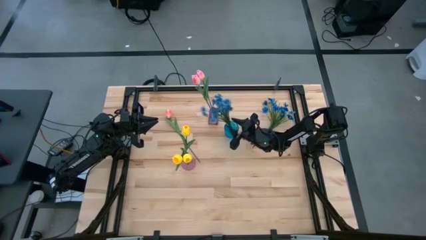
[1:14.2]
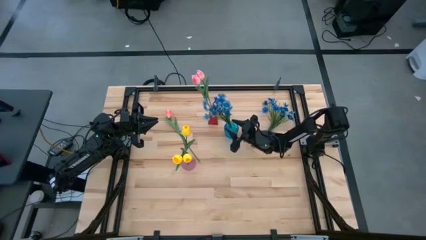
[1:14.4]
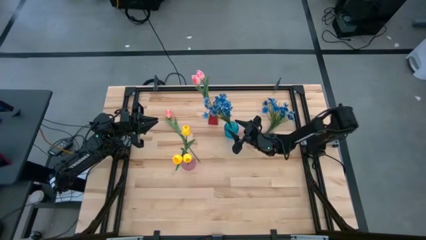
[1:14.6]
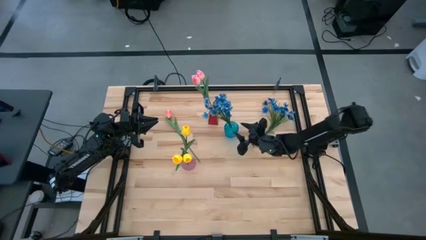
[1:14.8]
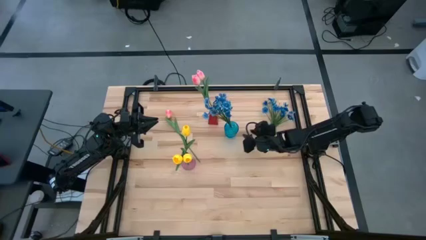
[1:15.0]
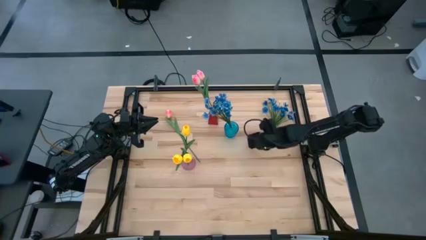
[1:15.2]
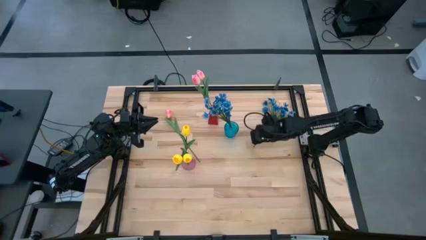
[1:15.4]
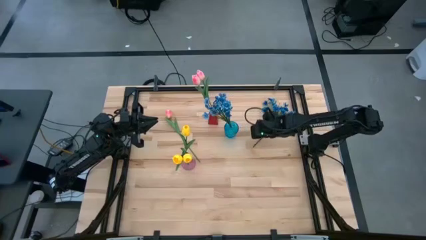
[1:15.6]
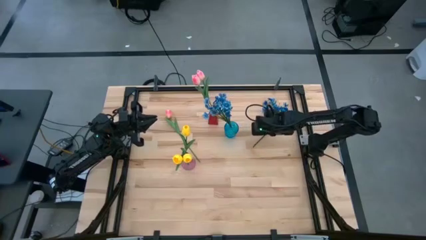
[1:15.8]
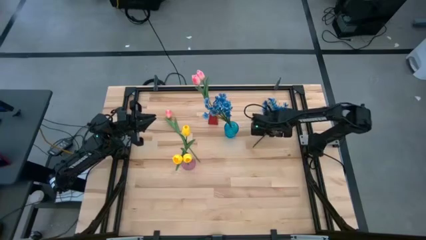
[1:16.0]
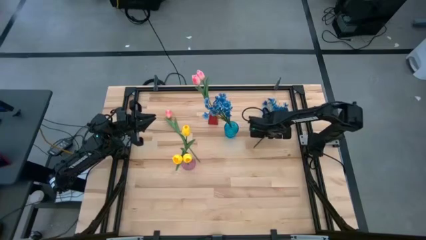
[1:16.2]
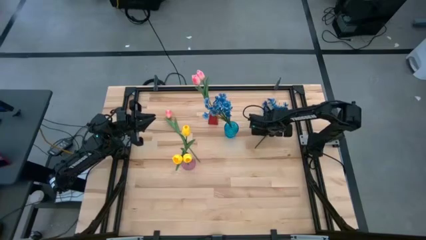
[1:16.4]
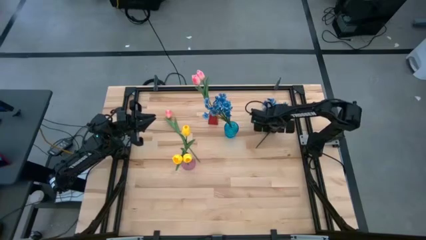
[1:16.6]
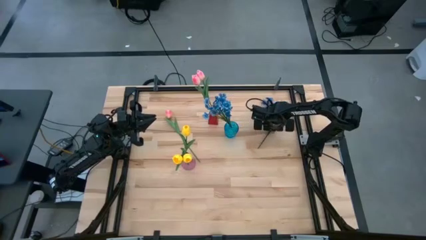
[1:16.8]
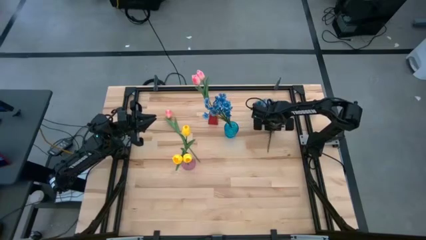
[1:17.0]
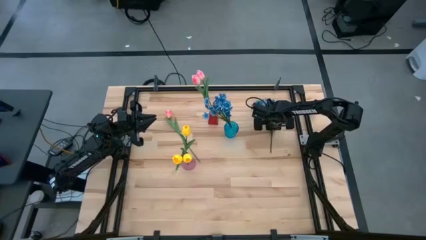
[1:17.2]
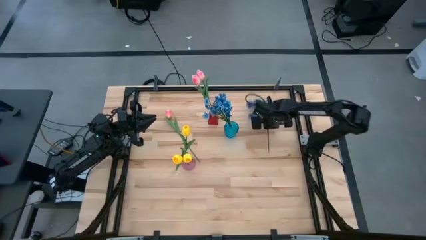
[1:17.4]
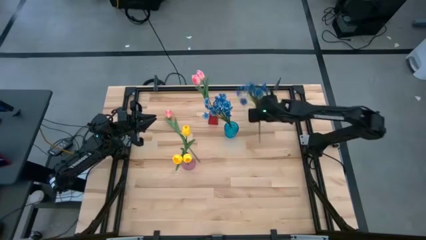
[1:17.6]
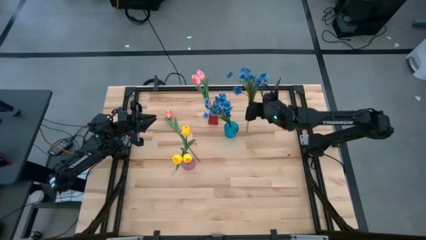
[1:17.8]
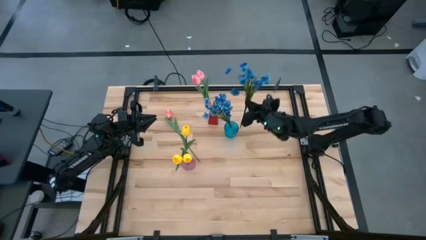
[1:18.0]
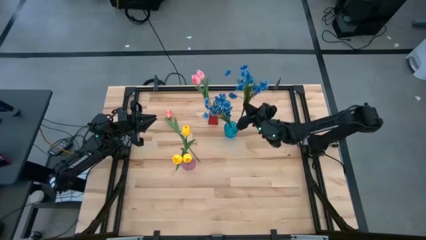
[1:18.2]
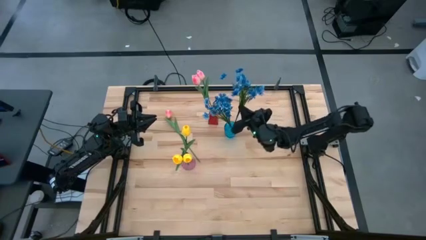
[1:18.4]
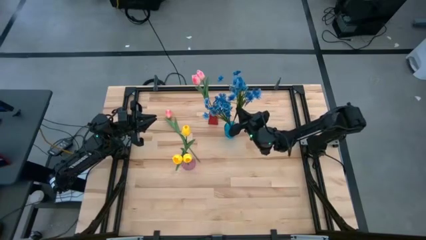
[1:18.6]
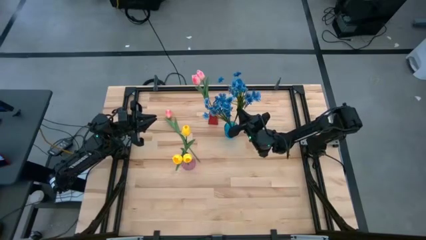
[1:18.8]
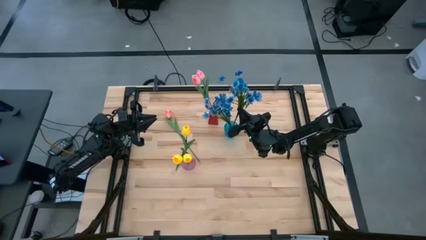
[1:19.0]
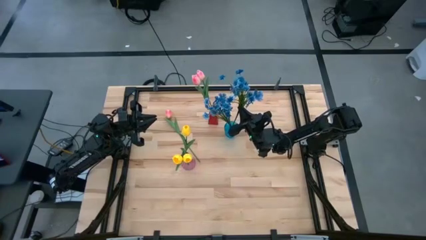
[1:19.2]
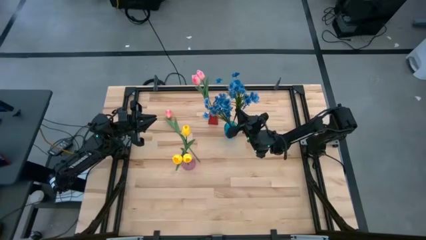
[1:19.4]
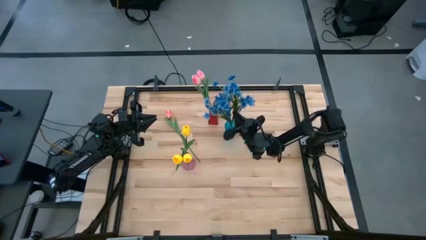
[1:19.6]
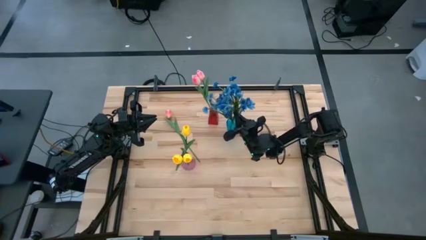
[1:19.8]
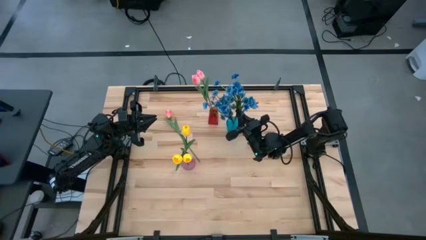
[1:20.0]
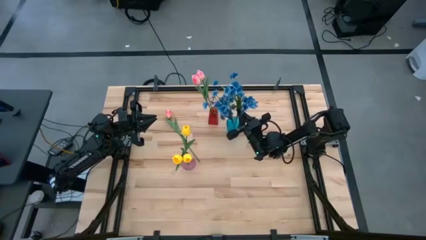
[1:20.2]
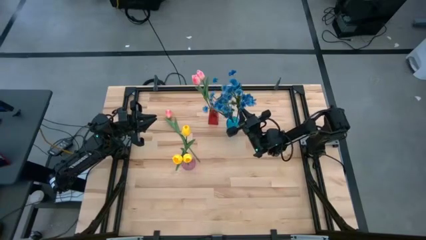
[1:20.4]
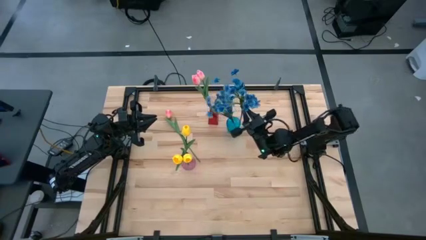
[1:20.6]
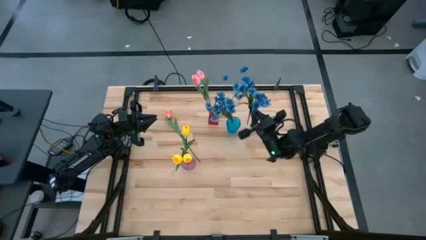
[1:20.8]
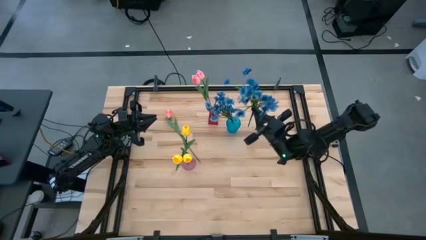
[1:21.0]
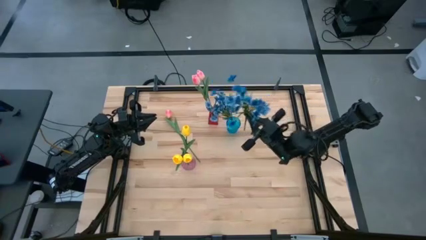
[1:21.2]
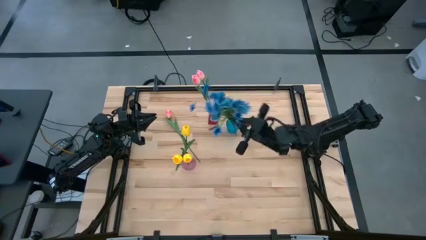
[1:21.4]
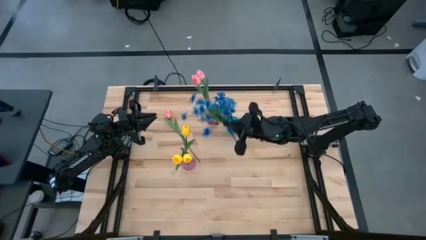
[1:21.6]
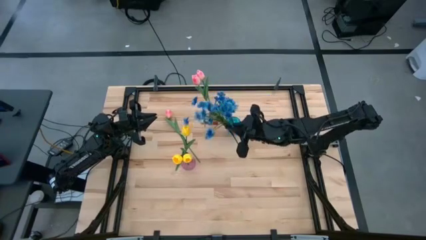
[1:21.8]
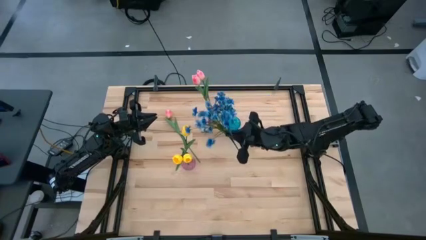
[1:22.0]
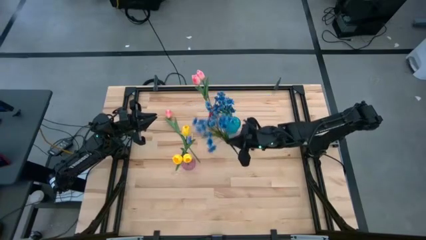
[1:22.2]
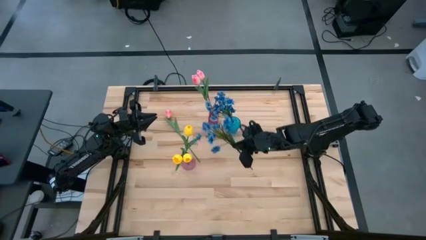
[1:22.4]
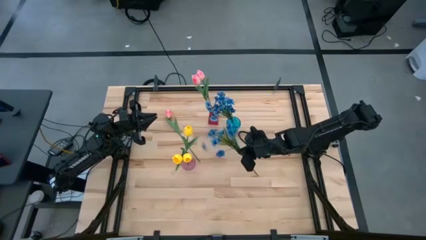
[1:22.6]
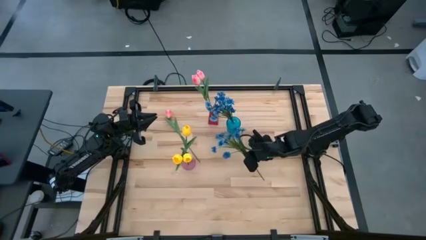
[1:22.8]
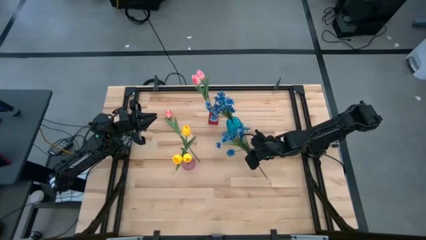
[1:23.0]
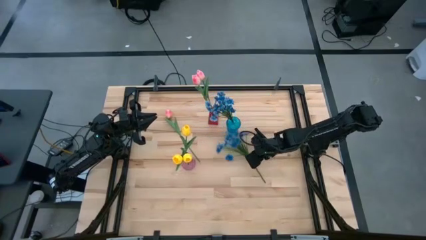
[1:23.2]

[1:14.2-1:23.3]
Task: Sort flowers into vase by color
Put the blue flowers into the blue vase

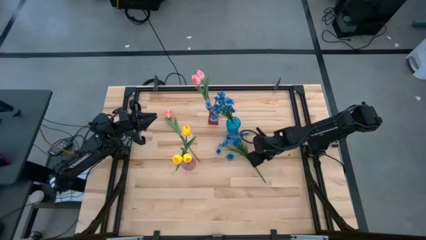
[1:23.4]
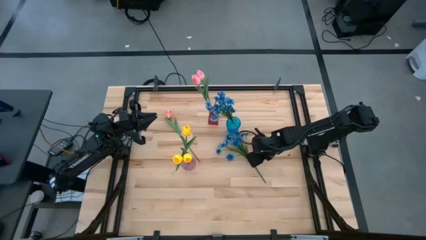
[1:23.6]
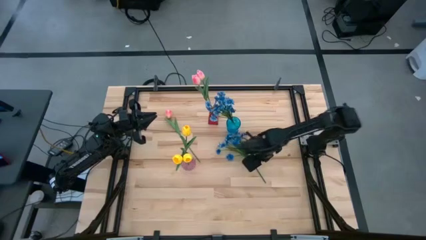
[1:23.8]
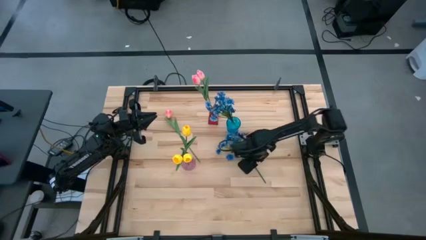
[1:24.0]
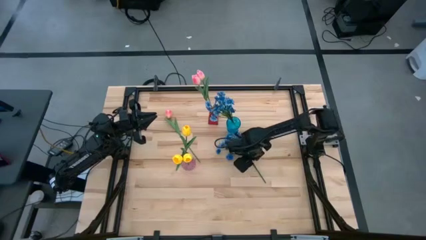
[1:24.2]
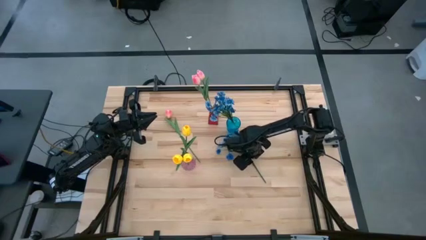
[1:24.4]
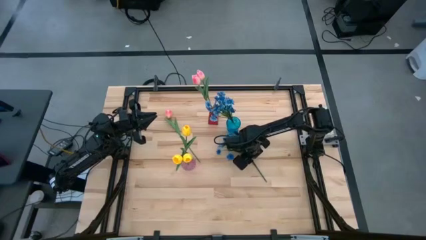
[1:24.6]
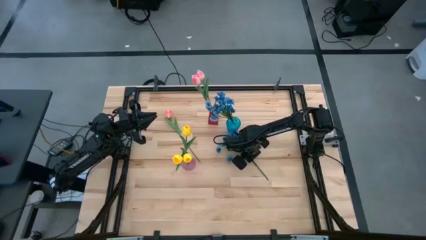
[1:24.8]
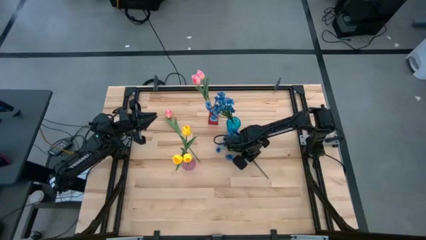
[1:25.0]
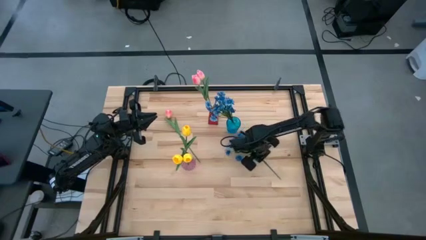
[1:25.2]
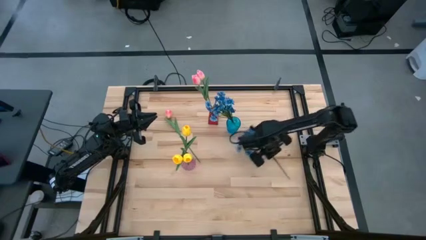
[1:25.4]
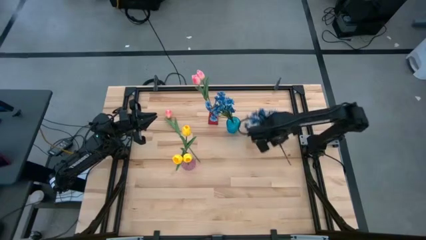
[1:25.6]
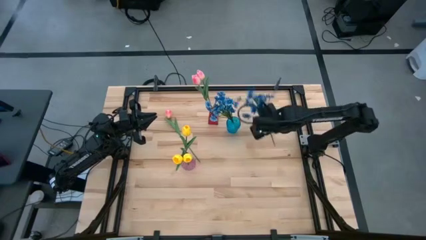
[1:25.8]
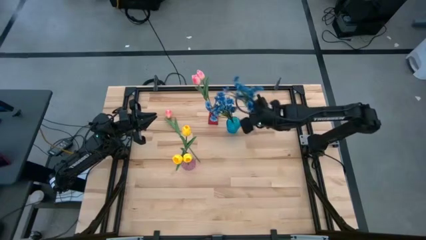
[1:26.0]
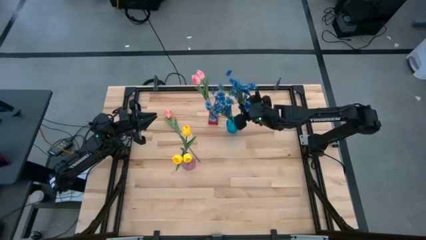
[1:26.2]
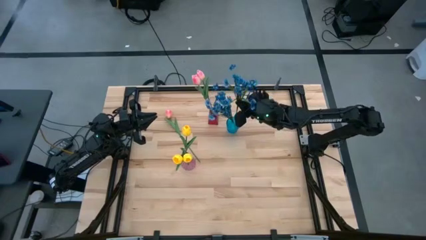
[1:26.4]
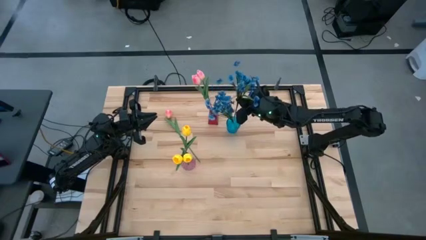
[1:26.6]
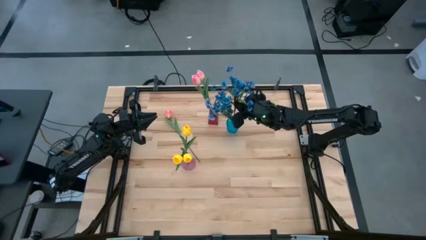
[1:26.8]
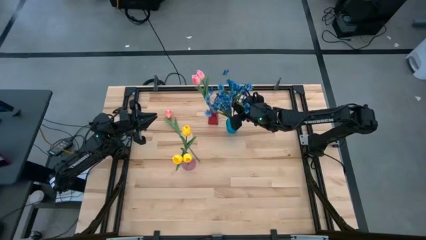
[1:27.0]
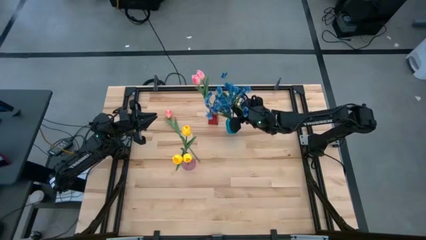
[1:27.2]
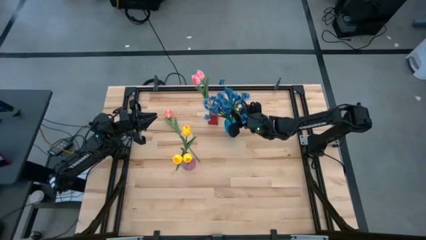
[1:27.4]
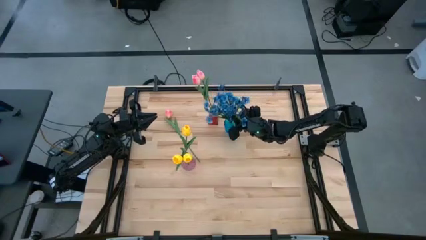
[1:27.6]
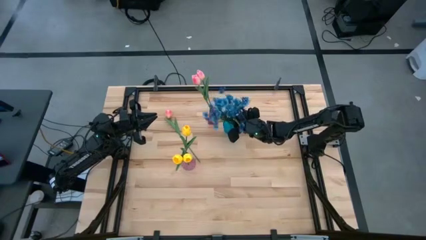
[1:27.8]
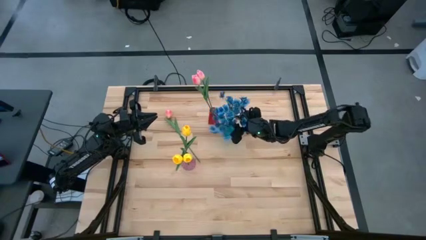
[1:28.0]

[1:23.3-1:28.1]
Put the blue flowers into the blue vase

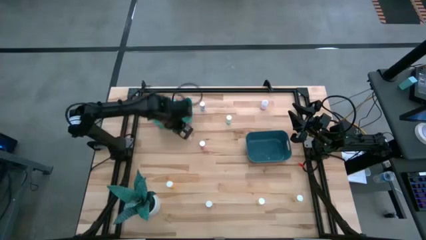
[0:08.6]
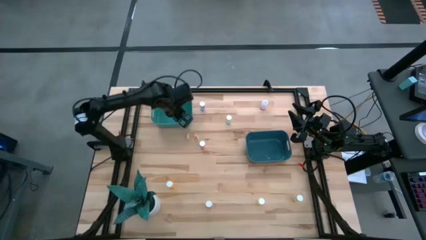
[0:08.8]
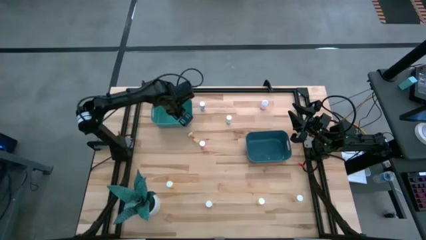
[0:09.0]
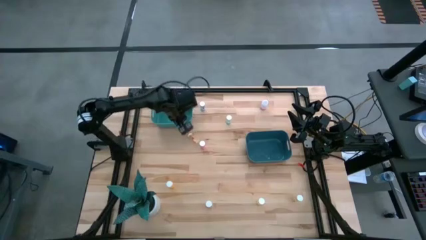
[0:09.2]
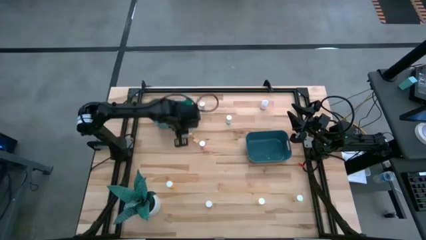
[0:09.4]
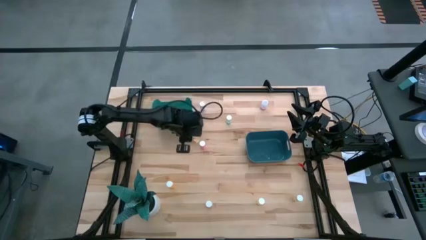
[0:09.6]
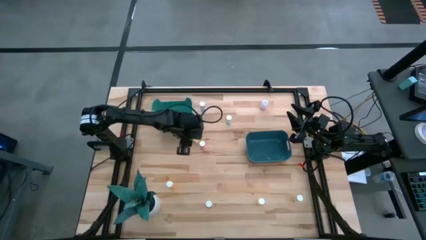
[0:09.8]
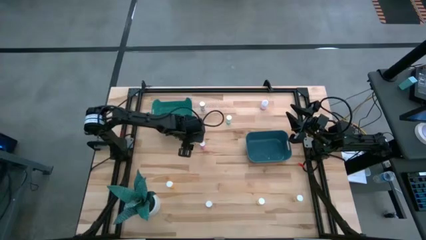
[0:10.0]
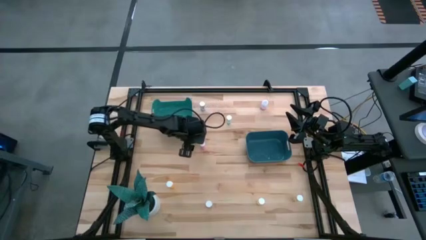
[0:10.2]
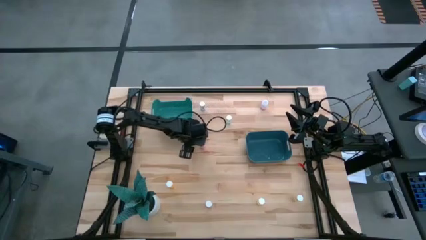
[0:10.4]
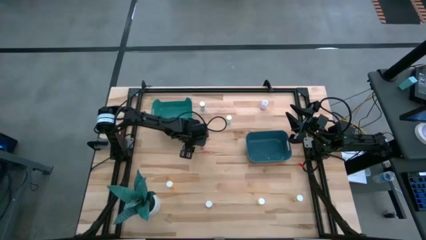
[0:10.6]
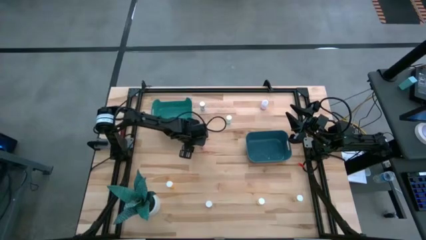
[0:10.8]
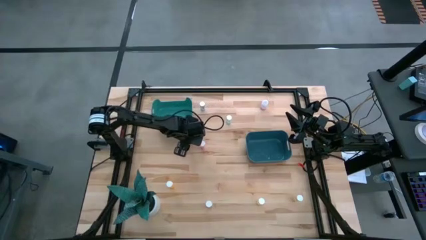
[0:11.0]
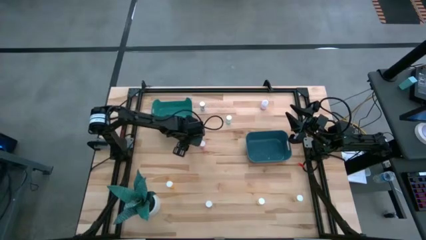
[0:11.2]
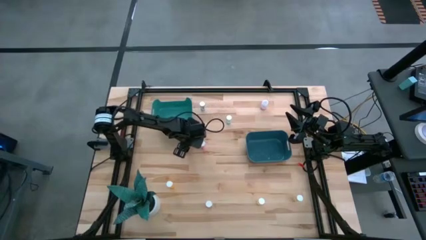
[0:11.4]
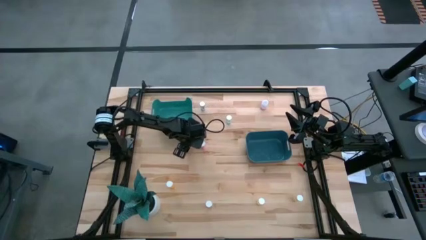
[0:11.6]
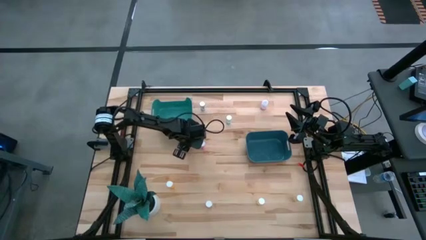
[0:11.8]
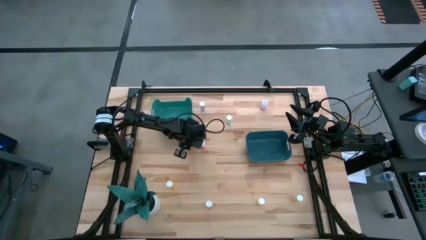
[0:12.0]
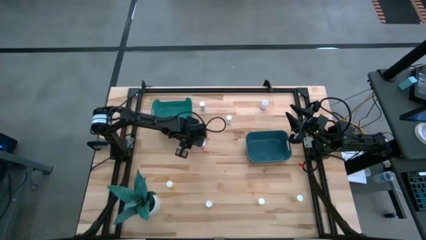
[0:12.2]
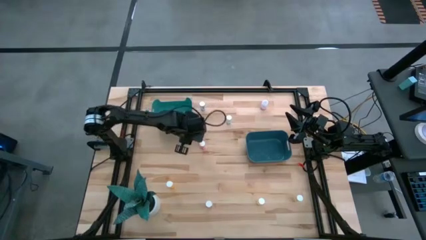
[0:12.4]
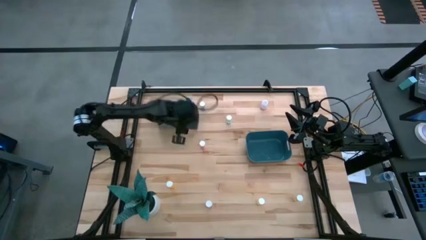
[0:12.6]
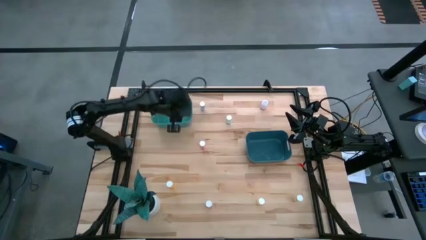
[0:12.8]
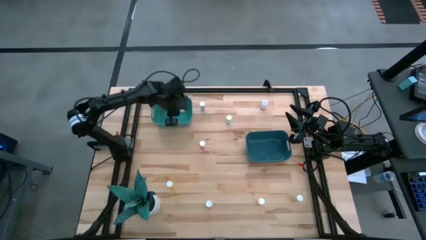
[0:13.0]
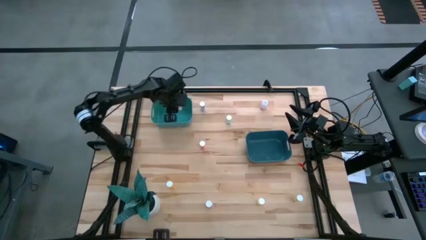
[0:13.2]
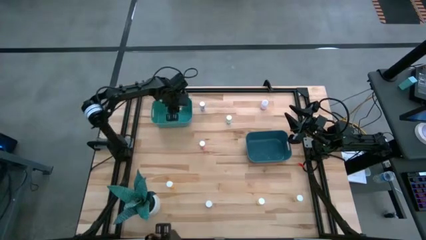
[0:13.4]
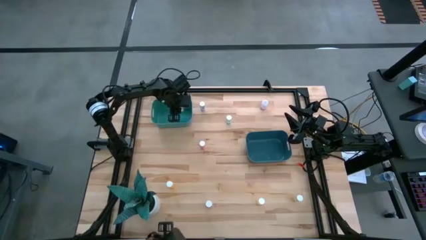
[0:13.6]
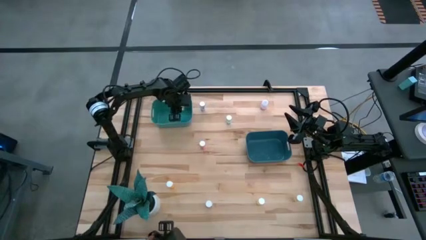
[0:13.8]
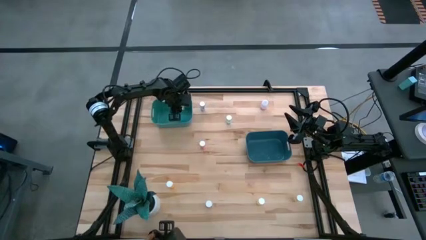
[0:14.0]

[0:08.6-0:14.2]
Task: Pick and place medicine bottles into bin by pill shape (circle, oval)
Put the yellow capsule bottle into the green bin
